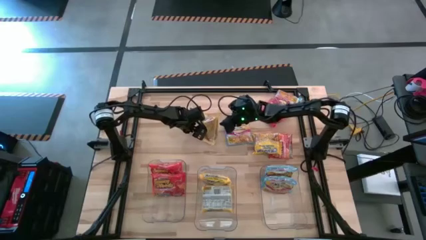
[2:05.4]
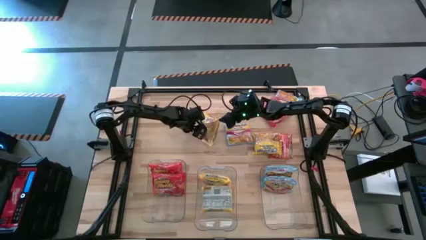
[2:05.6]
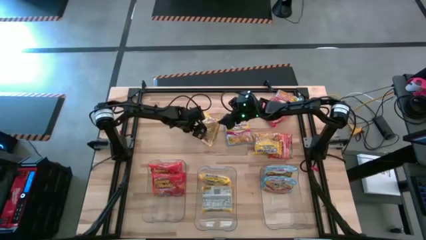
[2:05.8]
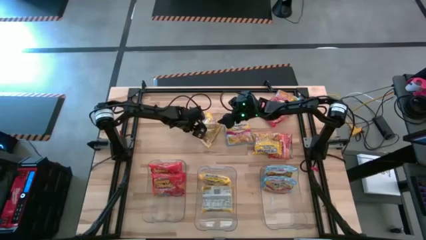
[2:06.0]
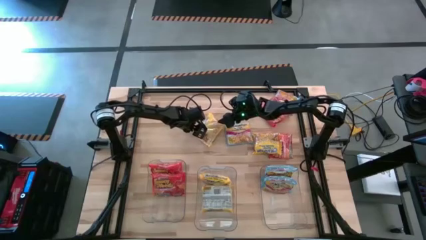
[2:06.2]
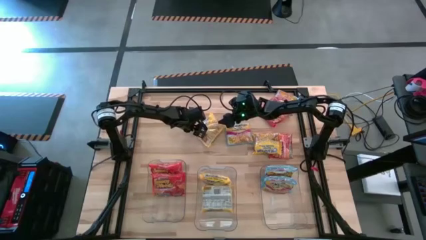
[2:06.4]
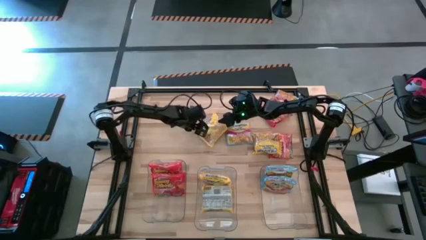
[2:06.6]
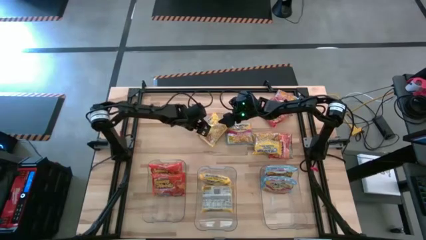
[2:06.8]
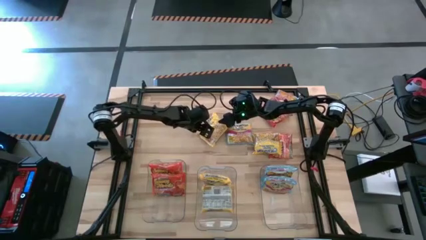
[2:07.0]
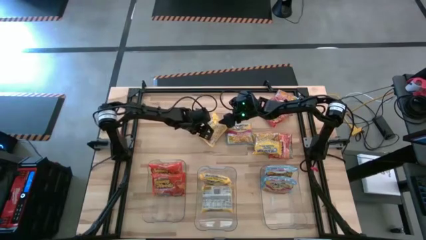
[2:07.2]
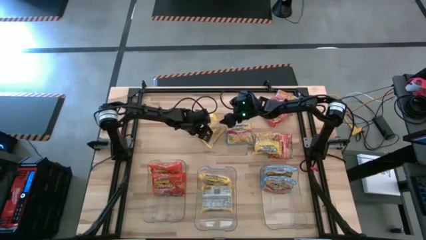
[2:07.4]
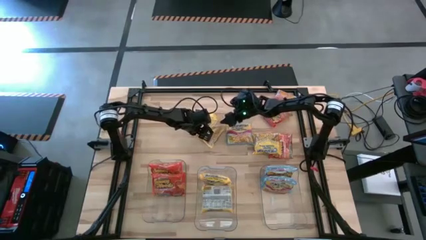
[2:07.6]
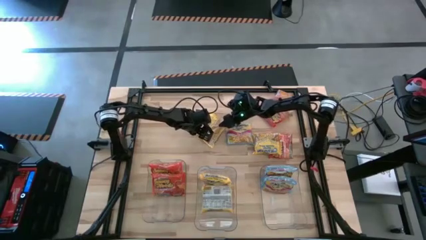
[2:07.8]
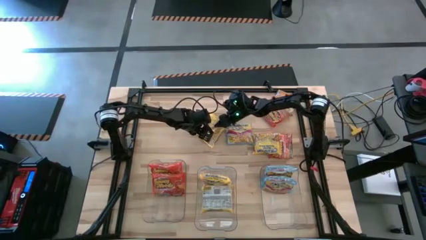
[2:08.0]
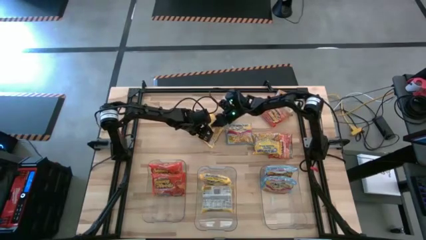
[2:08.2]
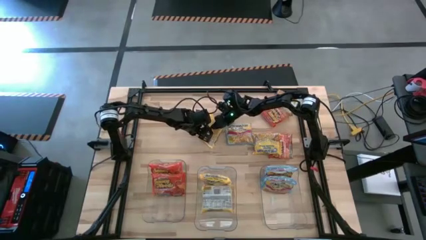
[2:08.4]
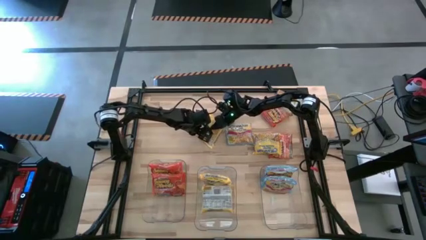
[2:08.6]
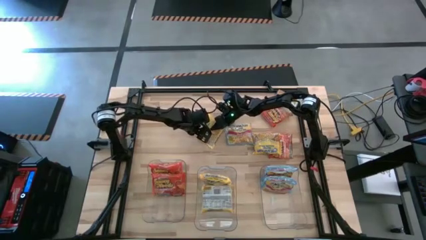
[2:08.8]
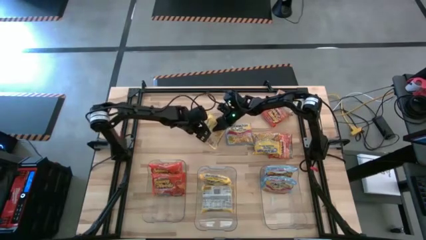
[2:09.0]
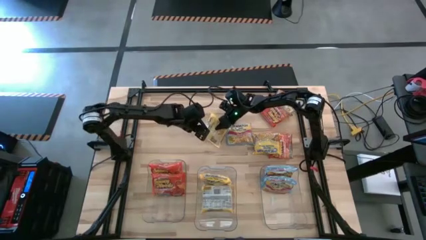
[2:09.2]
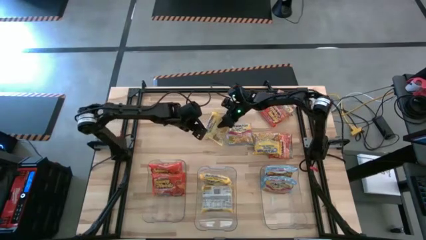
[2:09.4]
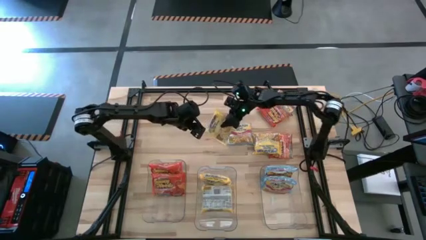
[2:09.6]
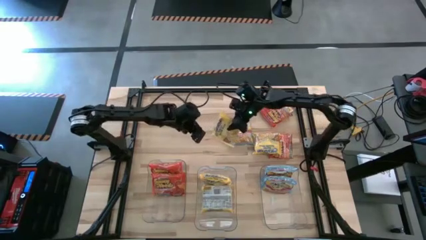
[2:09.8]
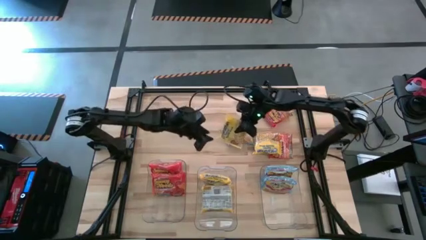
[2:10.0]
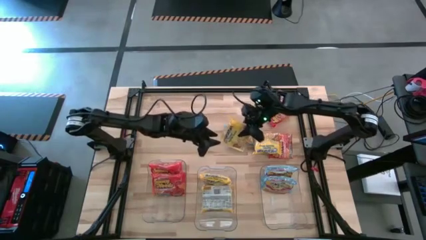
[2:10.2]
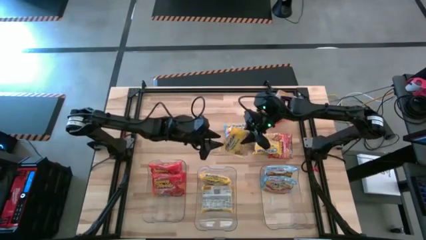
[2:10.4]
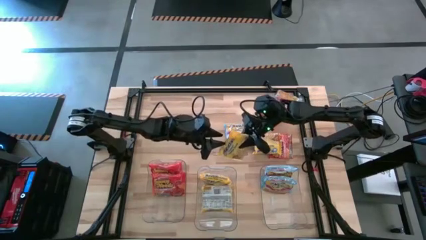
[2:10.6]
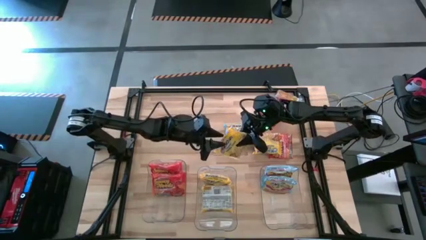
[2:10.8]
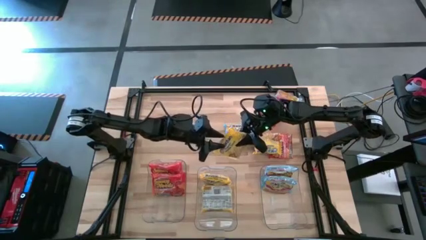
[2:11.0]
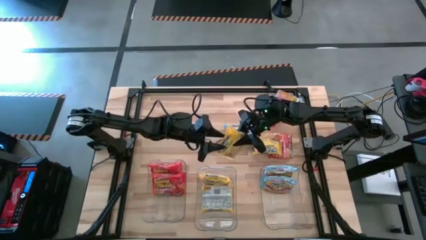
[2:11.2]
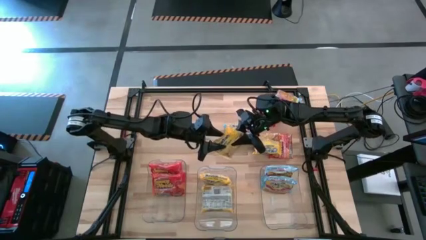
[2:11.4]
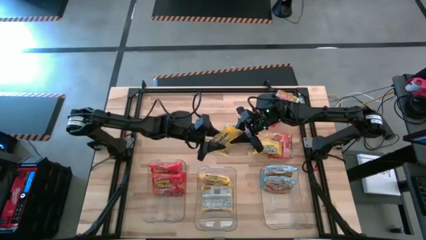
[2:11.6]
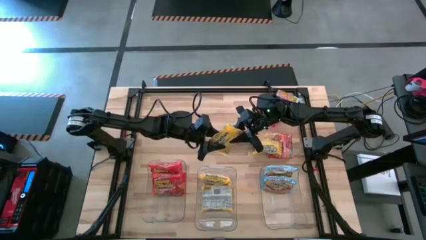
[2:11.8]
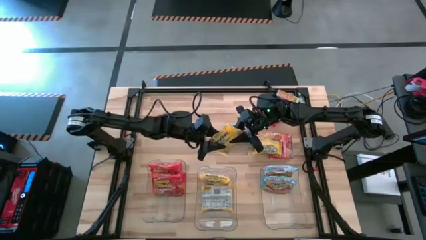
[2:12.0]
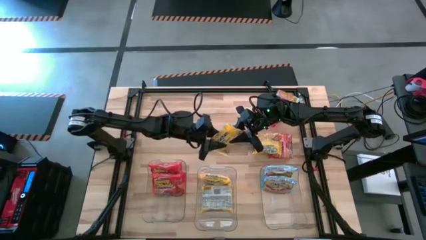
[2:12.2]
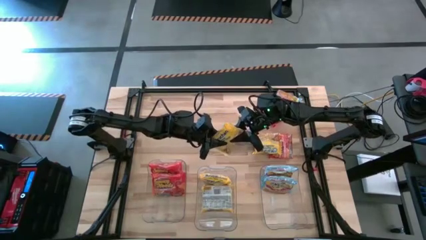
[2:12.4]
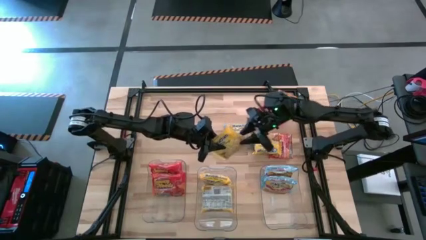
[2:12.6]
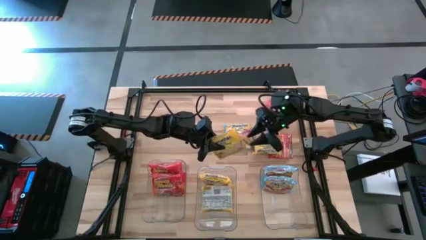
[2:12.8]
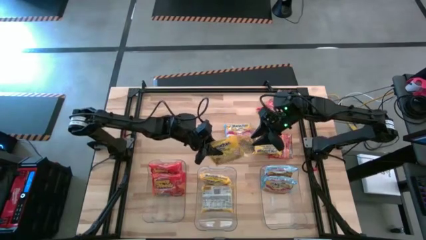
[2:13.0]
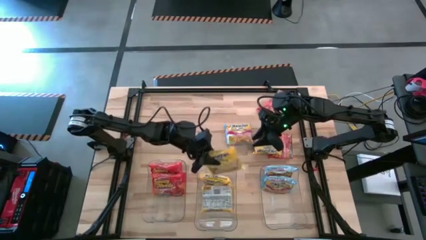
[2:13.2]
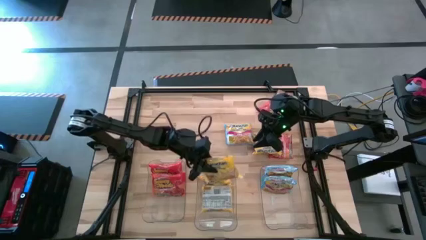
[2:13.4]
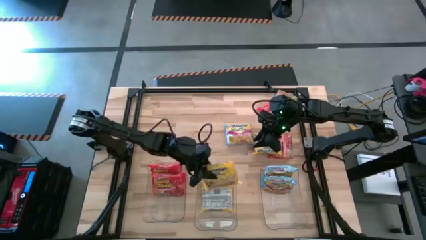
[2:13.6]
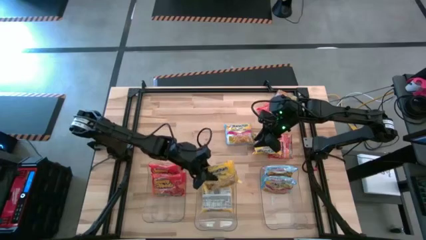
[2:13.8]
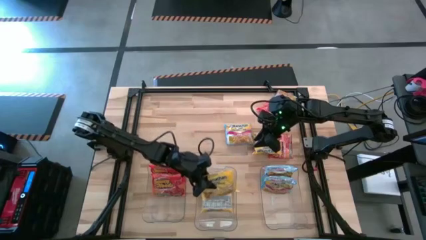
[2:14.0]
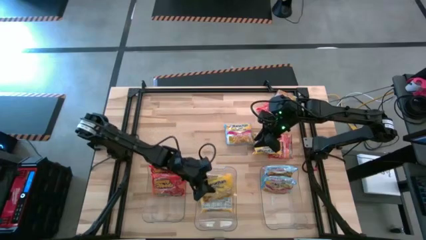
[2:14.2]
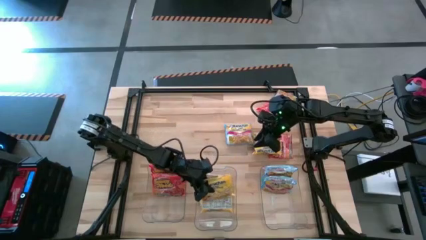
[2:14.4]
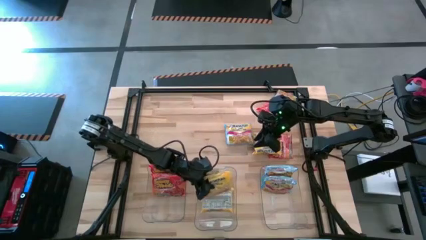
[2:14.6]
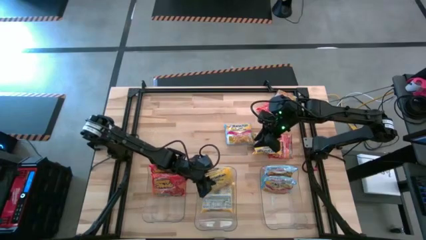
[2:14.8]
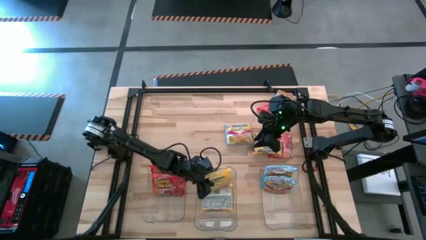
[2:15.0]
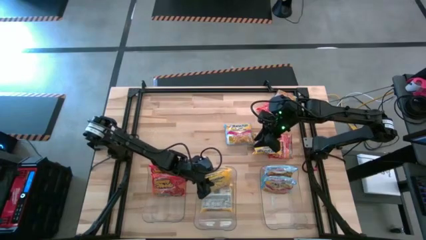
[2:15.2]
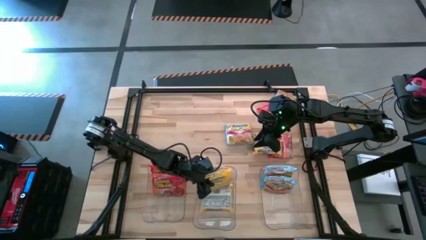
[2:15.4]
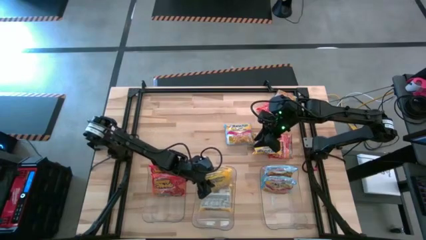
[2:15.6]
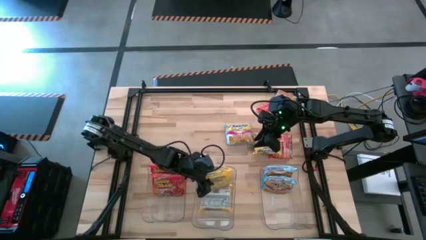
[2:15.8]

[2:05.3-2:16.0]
Task: Sort Maruchan noodles
Put the yellow noodle pack into the middle transparent bin
